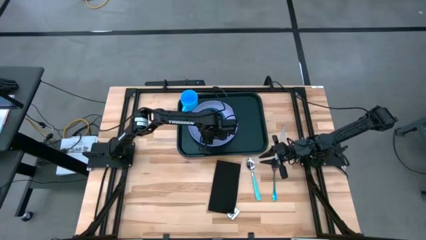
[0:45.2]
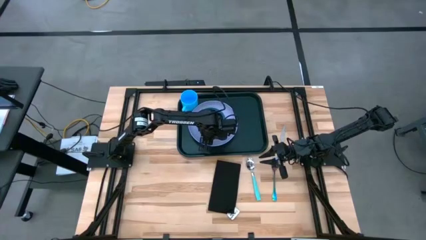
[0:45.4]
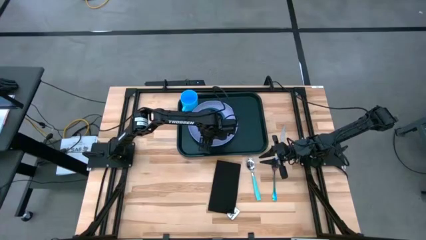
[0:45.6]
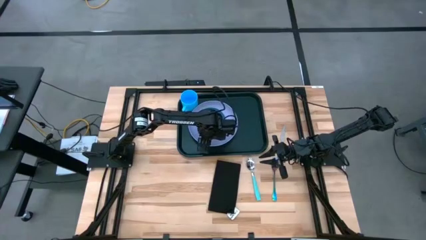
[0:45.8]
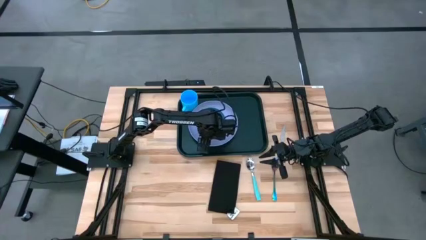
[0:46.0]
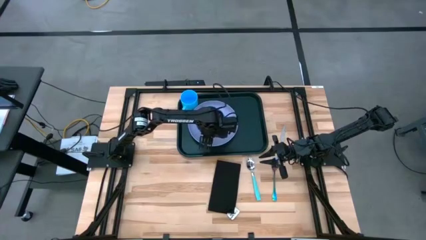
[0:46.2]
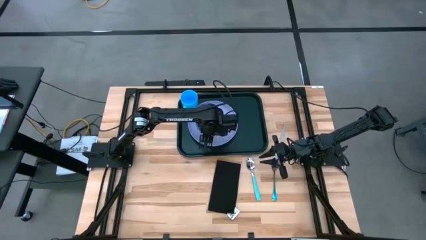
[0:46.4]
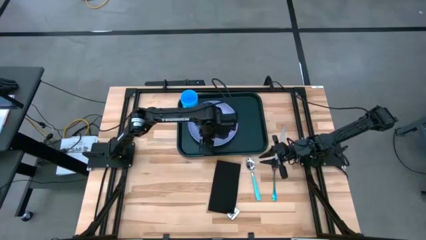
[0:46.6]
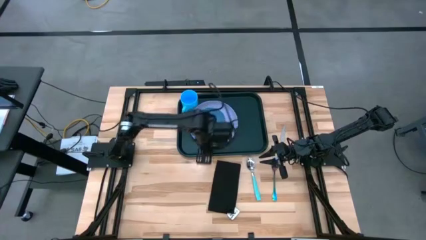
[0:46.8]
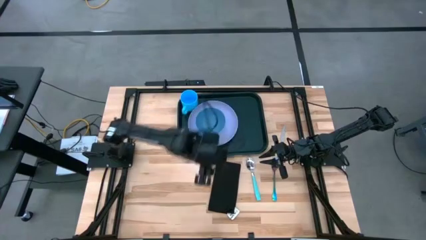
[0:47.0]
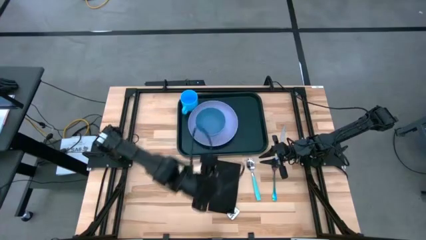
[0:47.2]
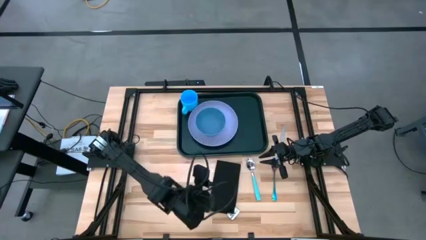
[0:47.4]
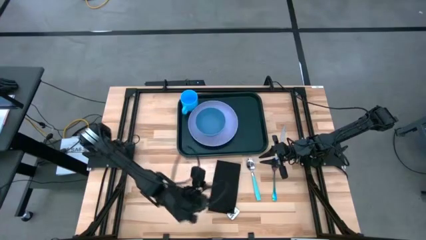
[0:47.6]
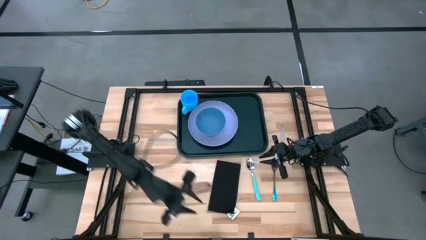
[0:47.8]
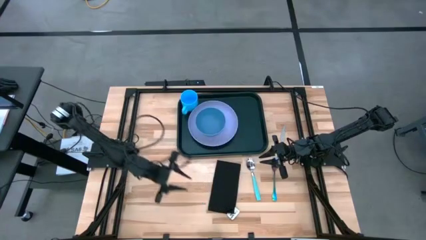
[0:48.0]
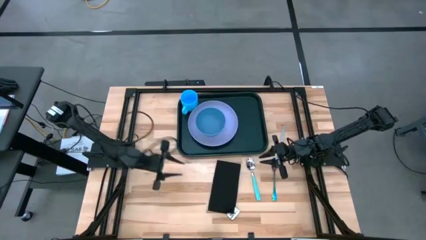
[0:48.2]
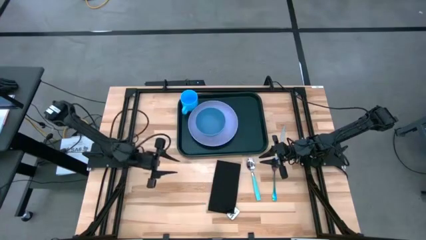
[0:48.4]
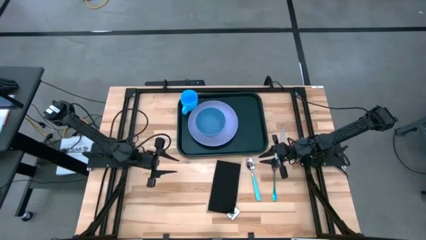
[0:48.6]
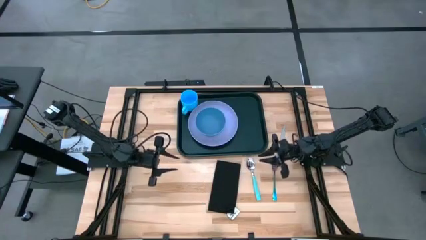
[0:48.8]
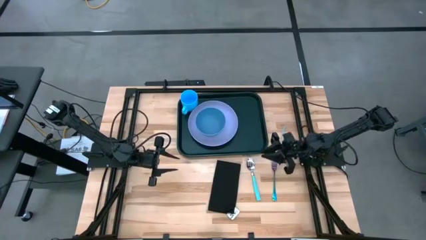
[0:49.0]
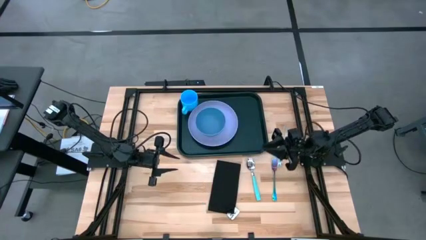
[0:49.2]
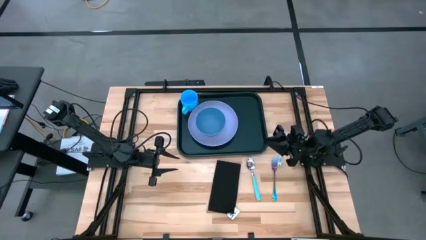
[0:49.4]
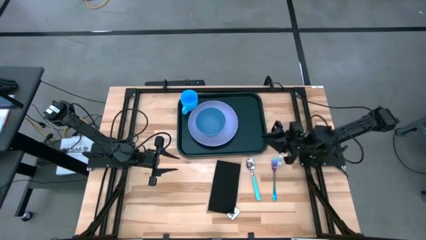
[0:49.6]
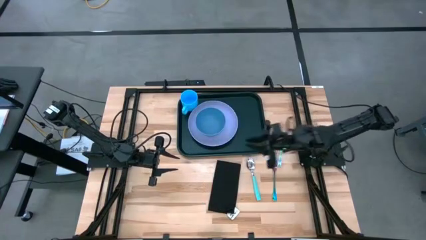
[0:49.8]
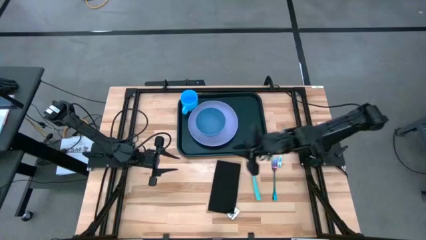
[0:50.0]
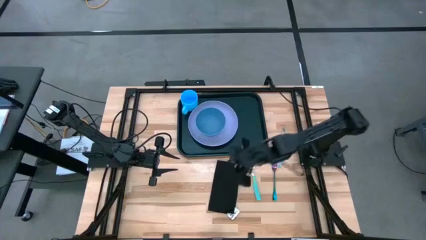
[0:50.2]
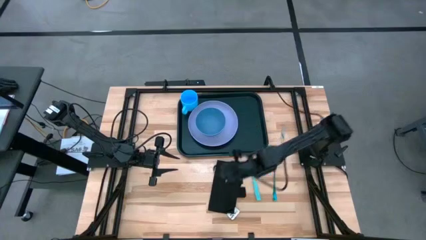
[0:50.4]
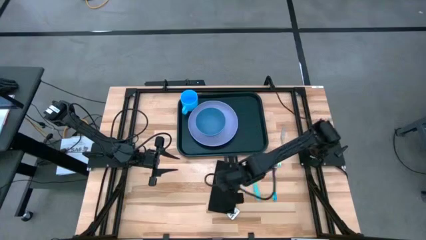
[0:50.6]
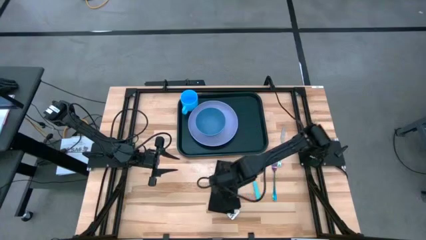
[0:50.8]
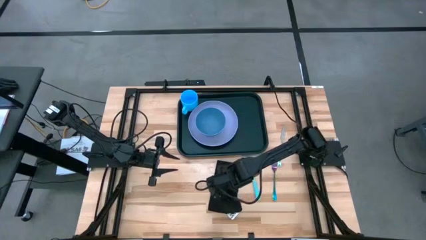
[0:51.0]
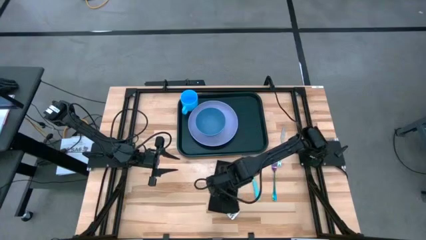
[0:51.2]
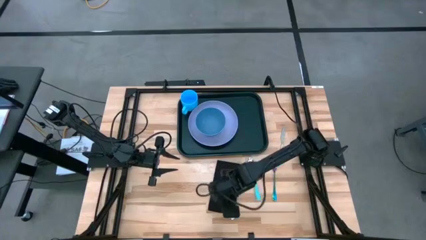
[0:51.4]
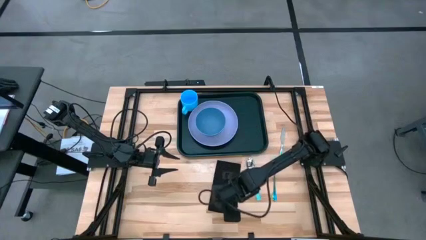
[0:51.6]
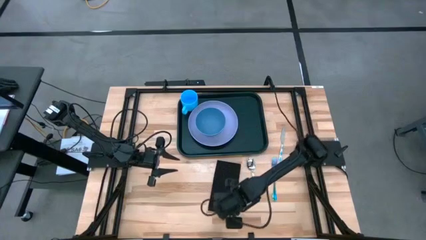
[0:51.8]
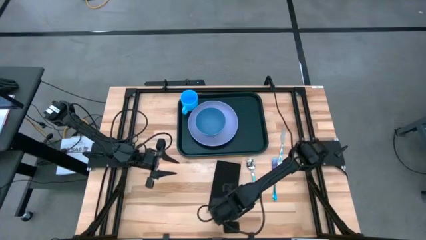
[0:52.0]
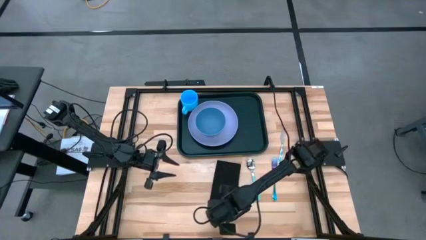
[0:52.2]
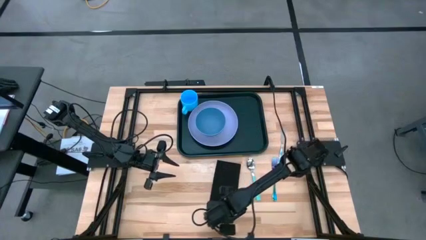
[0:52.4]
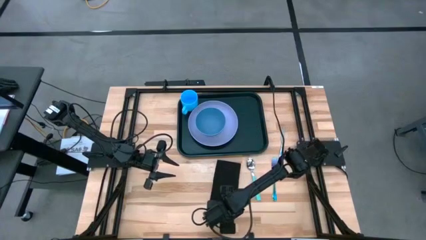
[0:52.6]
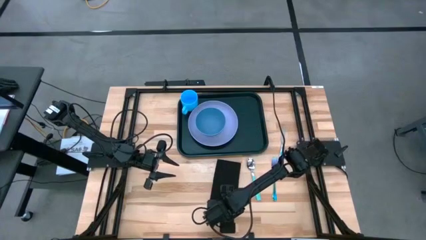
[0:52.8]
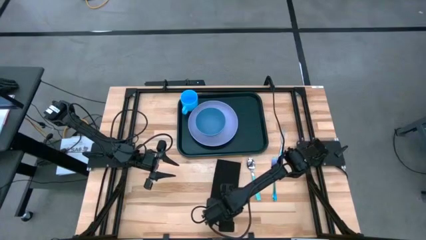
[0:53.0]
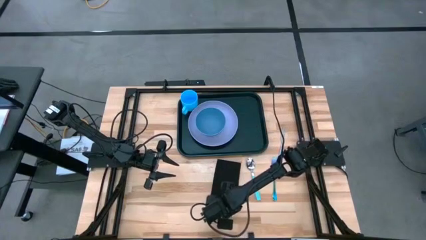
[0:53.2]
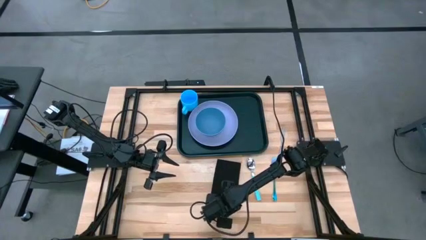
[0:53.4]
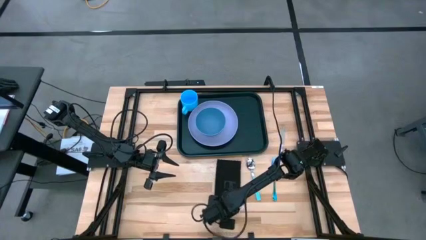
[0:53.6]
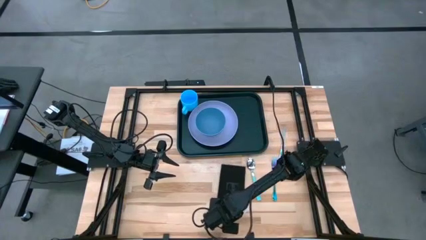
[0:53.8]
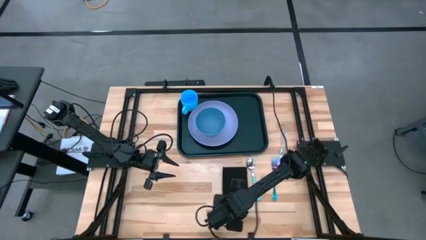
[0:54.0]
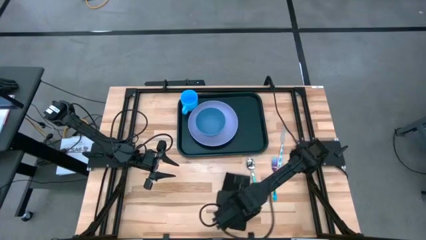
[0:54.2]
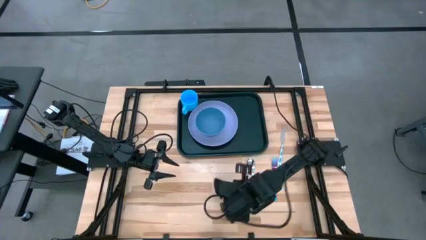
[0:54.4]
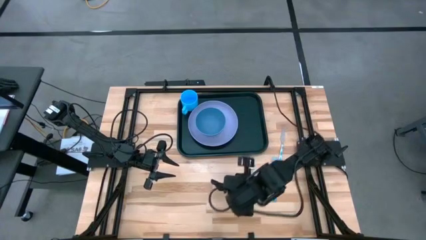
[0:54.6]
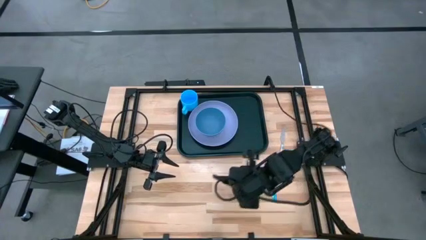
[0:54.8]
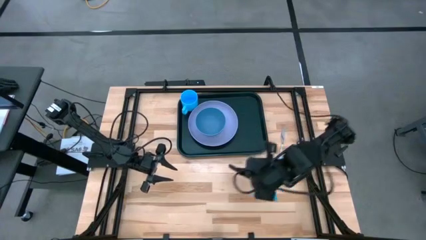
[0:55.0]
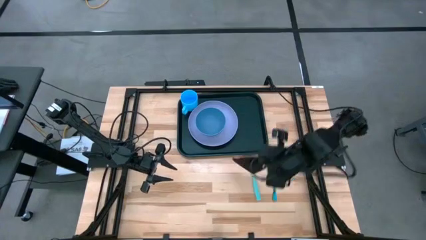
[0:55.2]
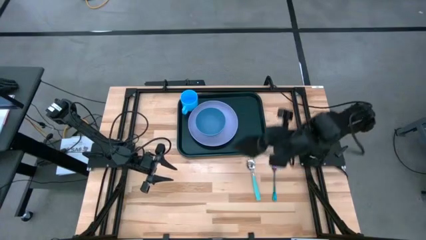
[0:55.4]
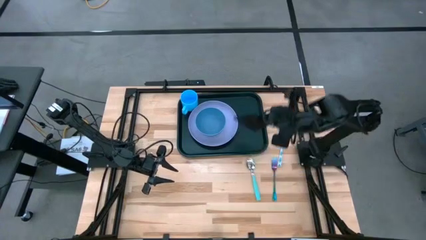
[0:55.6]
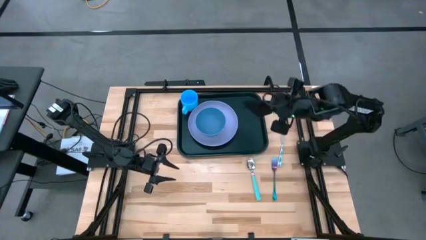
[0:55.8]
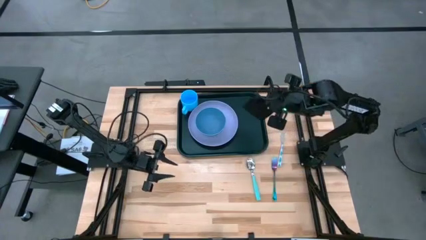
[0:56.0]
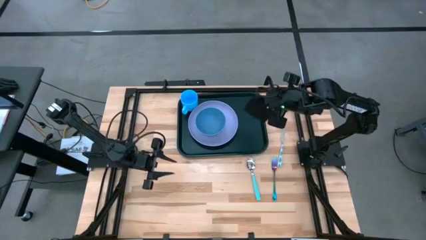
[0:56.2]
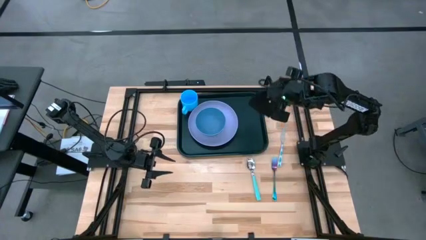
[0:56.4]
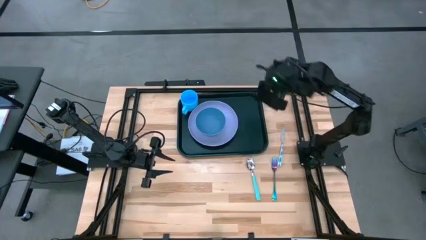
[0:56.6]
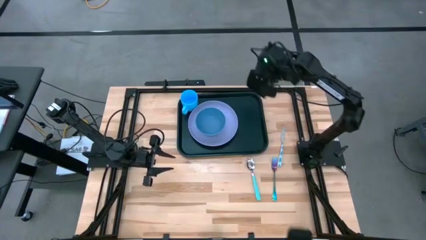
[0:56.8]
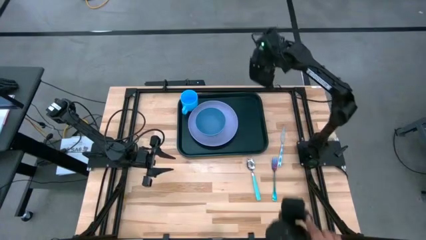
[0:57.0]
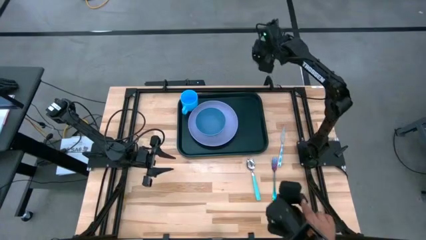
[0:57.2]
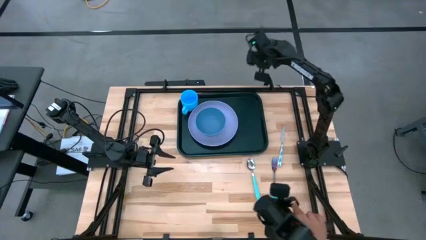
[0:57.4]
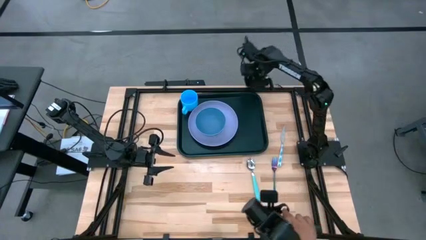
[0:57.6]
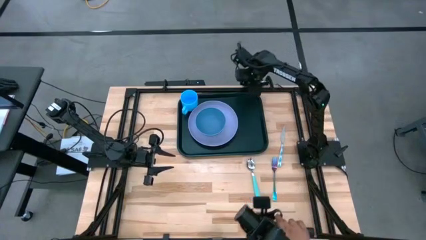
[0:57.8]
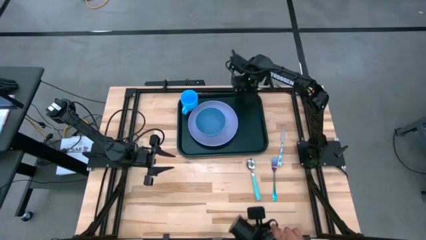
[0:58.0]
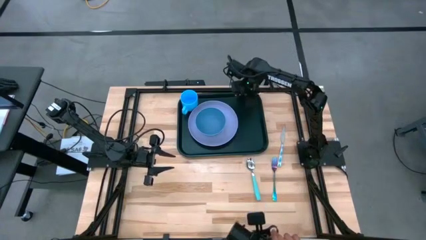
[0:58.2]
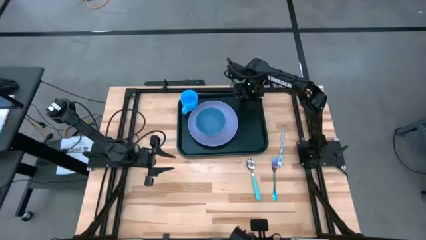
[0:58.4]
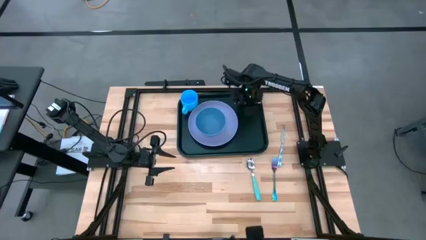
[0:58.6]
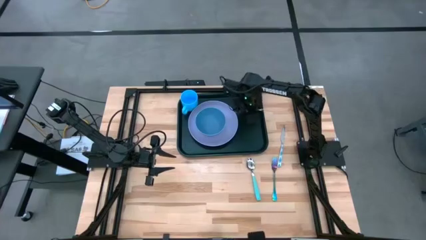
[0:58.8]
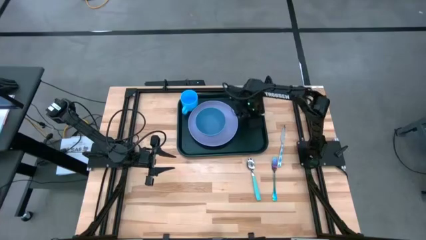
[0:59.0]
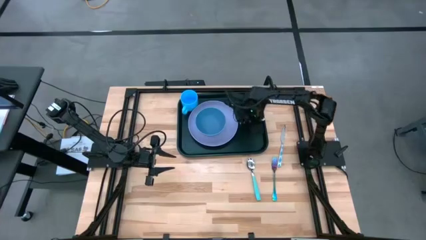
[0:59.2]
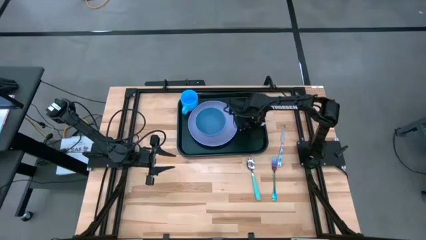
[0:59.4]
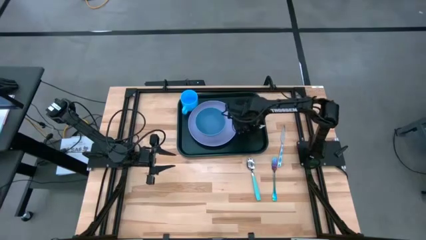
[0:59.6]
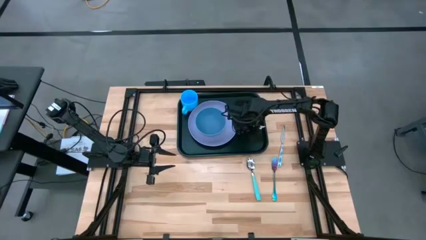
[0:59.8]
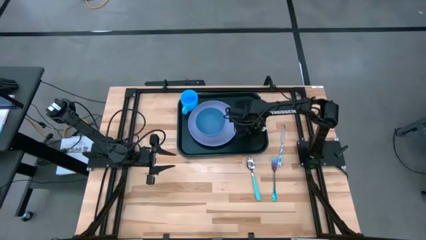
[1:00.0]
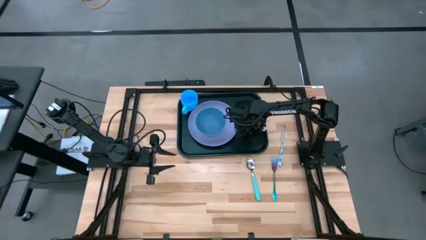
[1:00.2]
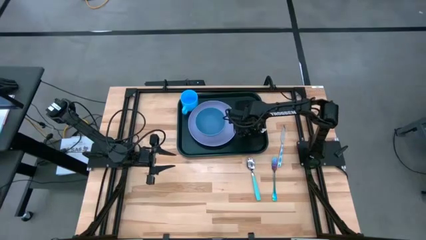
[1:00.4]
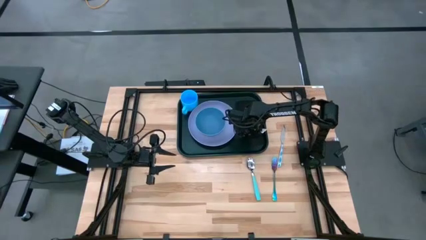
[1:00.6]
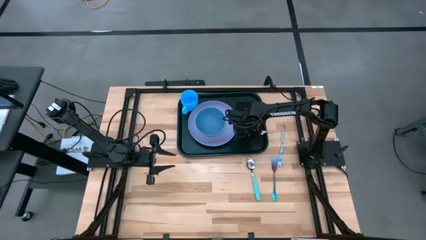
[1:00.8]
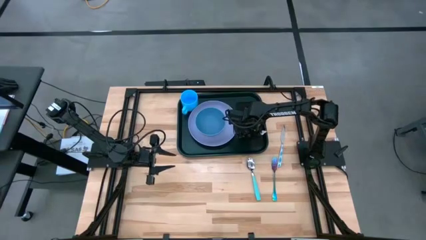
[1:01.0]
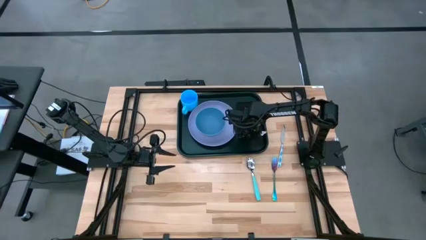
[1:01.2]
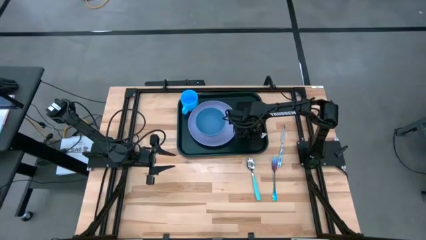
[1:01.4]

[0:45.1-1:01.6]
Task: Set up tray
Put the black table napkin to the right of the purple plate on the black serving tray
